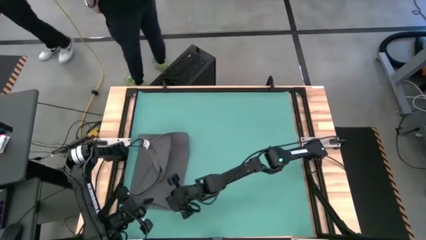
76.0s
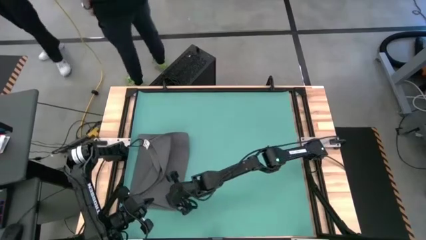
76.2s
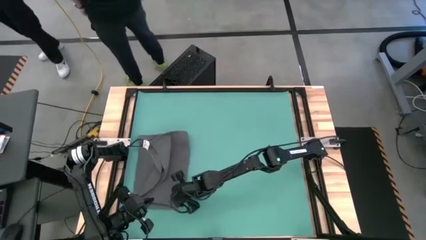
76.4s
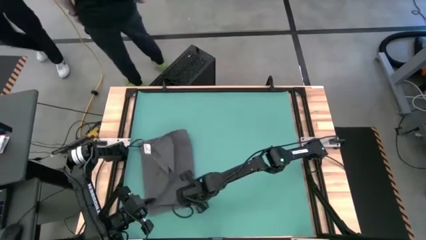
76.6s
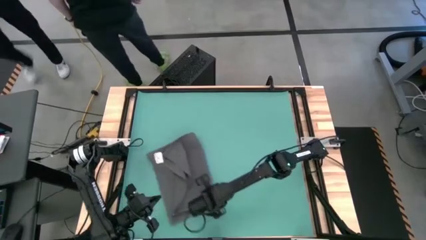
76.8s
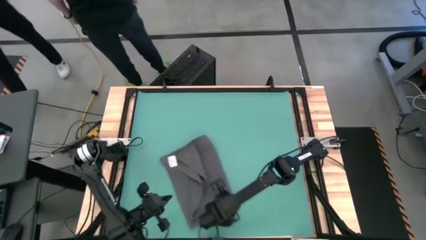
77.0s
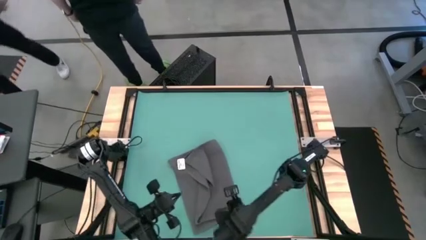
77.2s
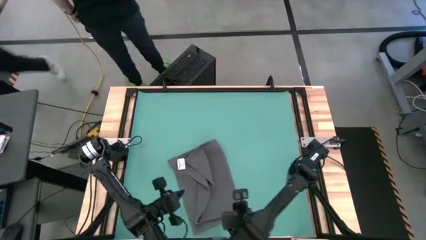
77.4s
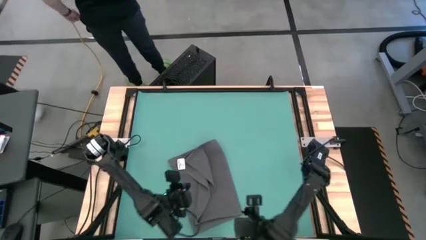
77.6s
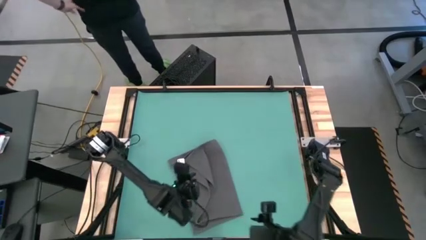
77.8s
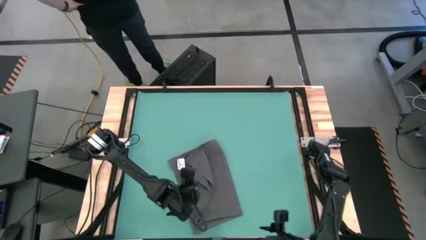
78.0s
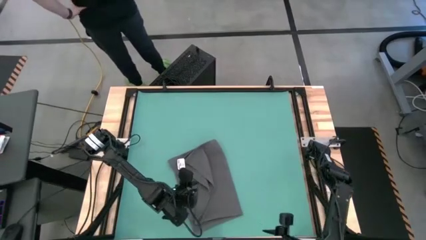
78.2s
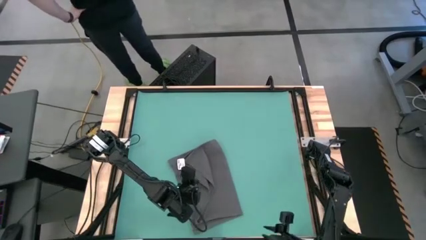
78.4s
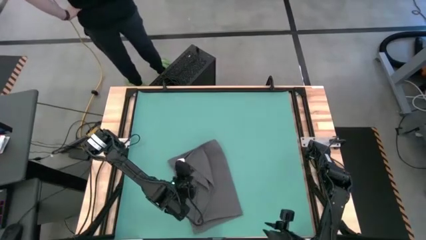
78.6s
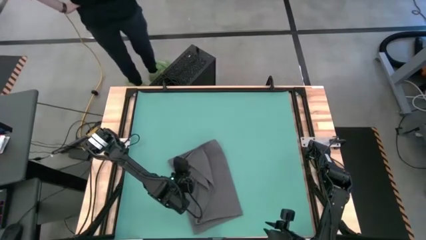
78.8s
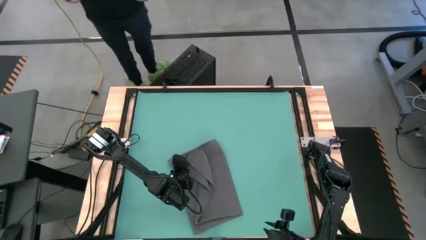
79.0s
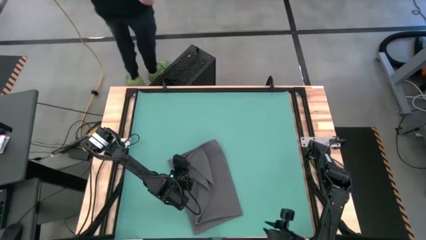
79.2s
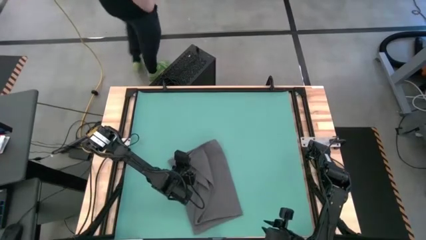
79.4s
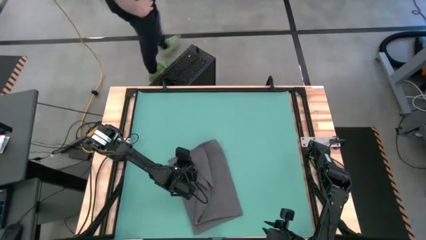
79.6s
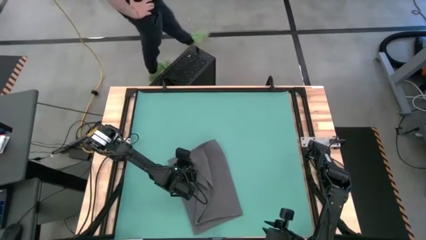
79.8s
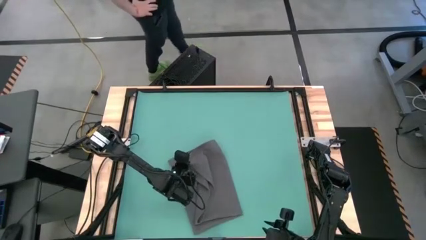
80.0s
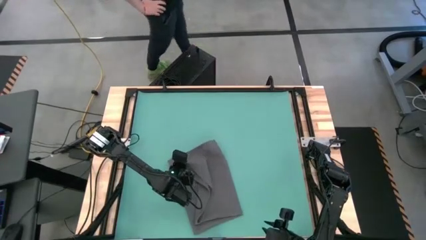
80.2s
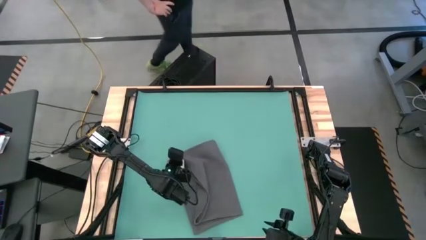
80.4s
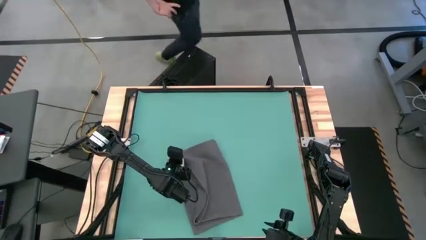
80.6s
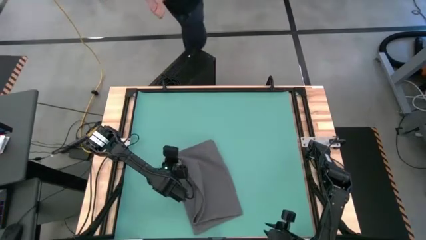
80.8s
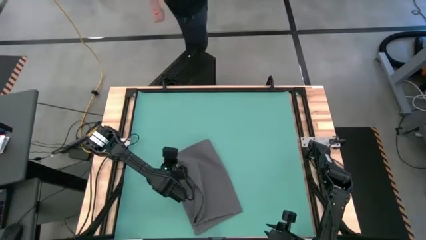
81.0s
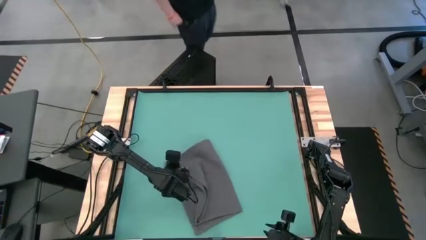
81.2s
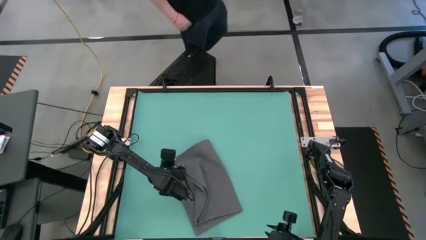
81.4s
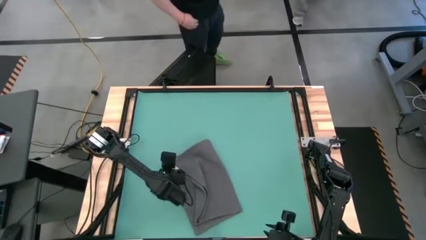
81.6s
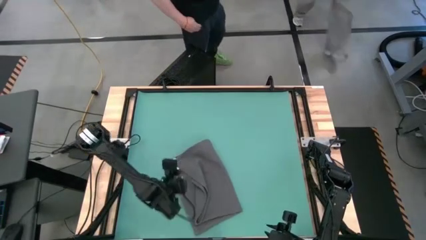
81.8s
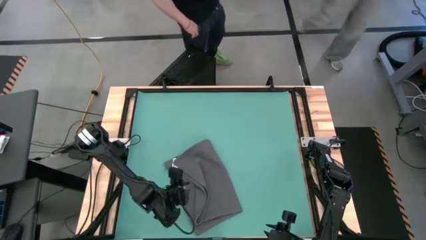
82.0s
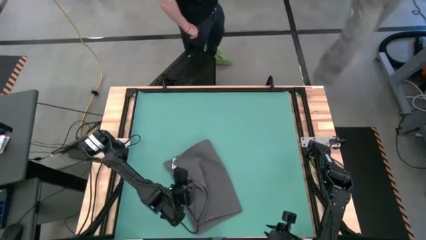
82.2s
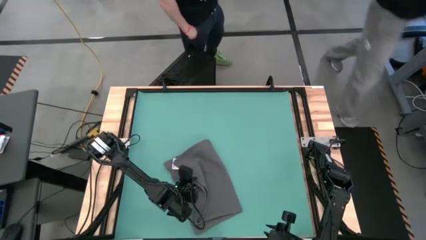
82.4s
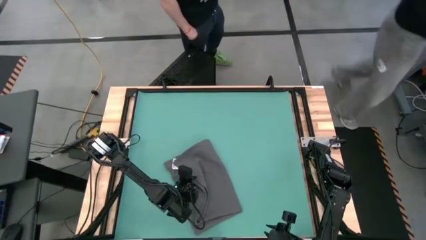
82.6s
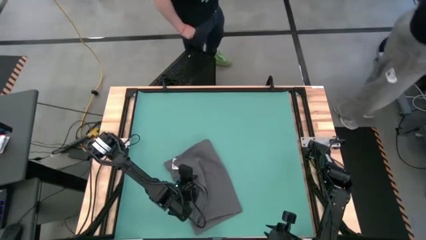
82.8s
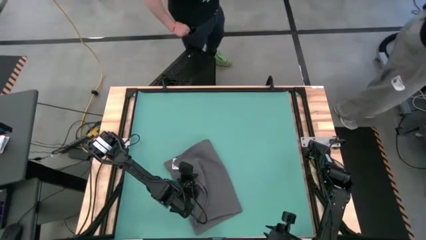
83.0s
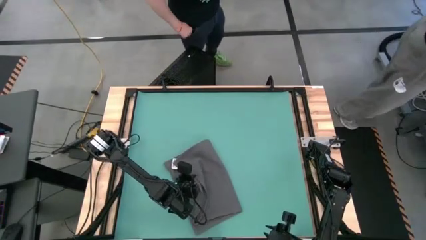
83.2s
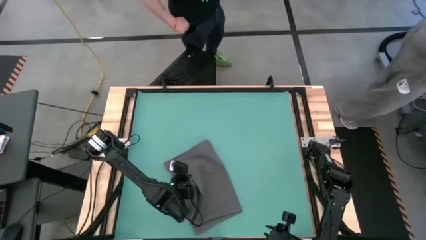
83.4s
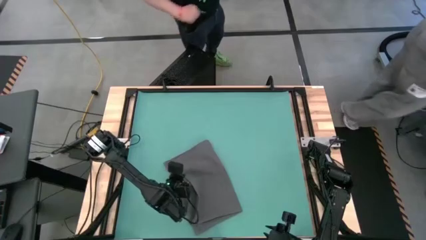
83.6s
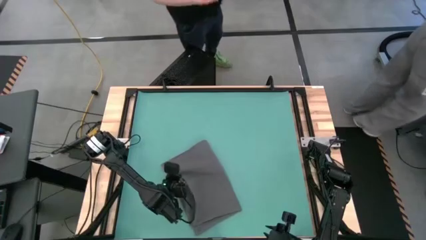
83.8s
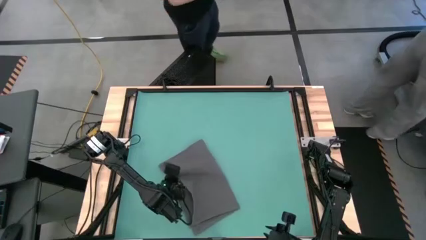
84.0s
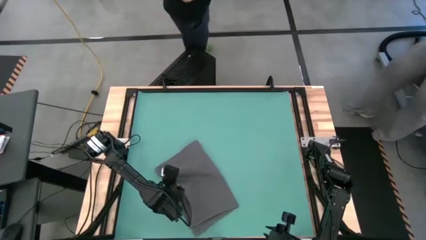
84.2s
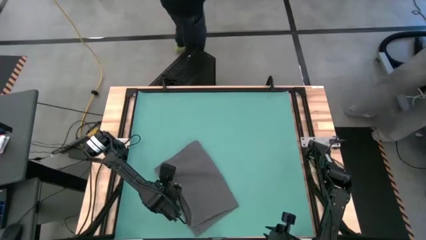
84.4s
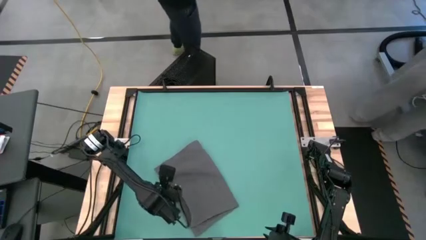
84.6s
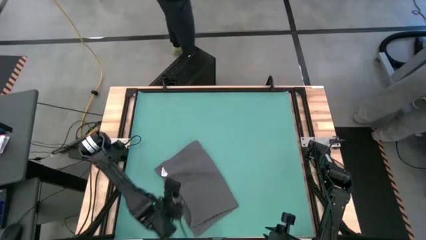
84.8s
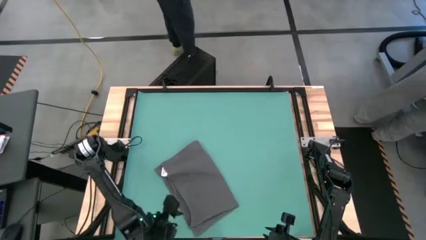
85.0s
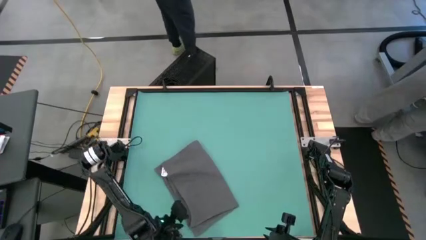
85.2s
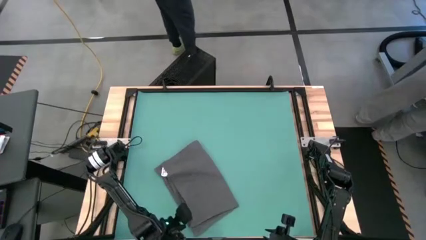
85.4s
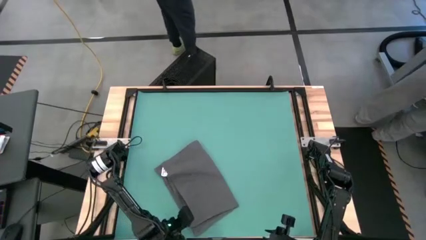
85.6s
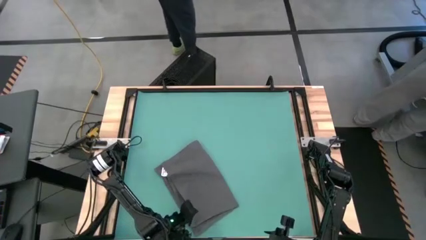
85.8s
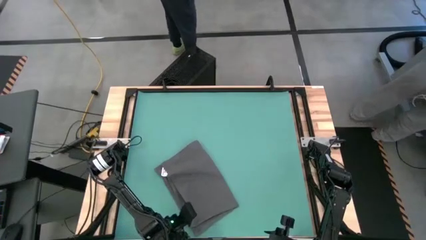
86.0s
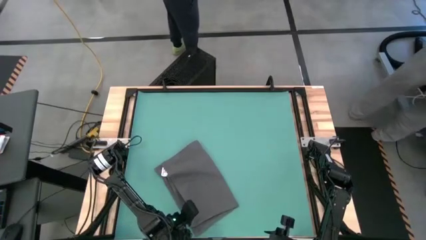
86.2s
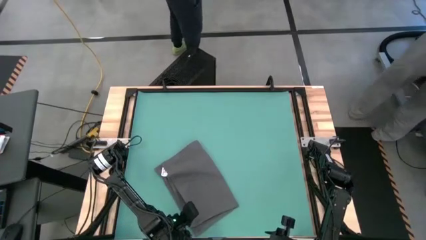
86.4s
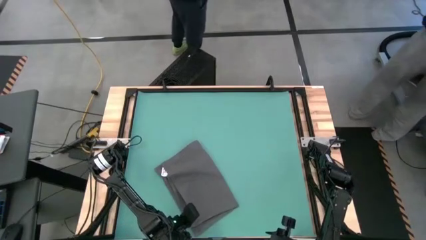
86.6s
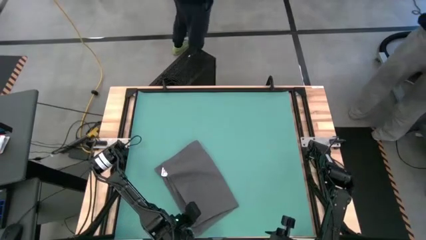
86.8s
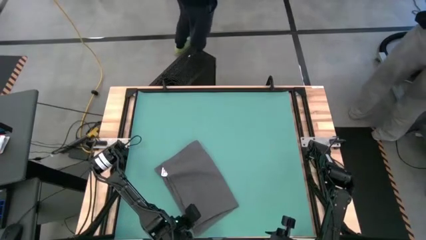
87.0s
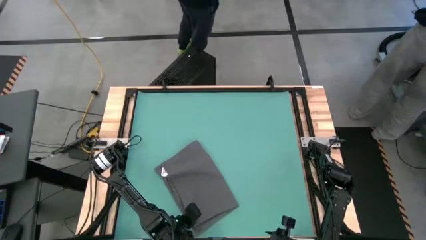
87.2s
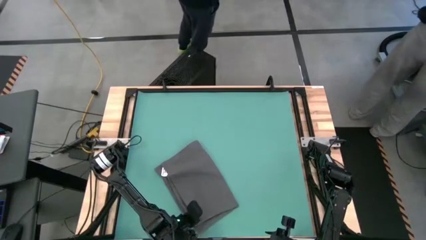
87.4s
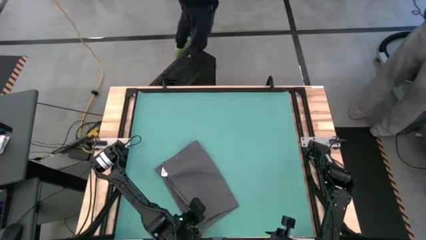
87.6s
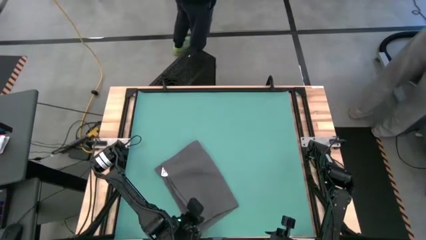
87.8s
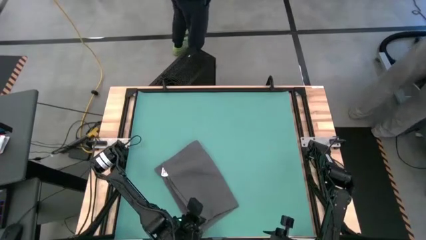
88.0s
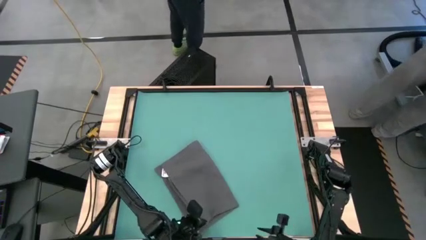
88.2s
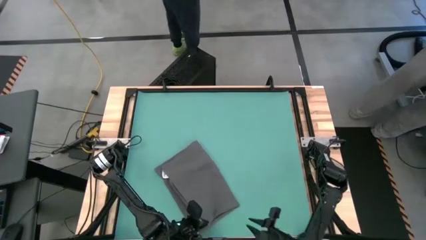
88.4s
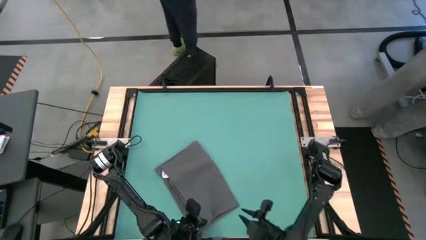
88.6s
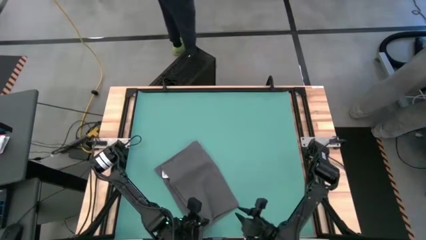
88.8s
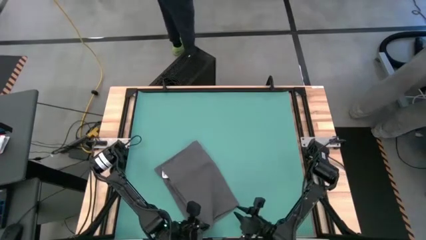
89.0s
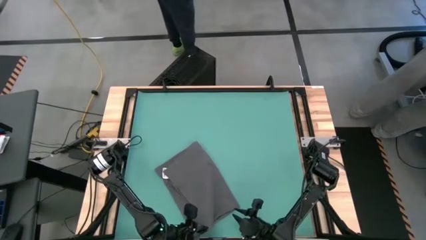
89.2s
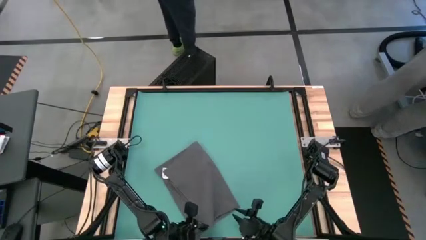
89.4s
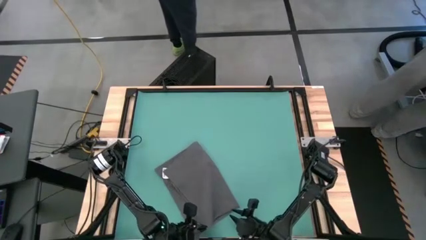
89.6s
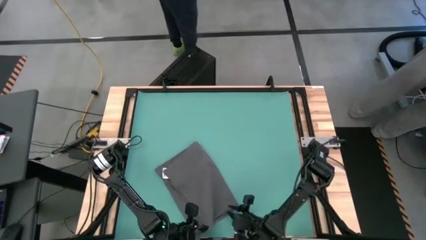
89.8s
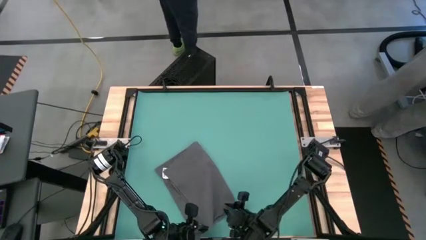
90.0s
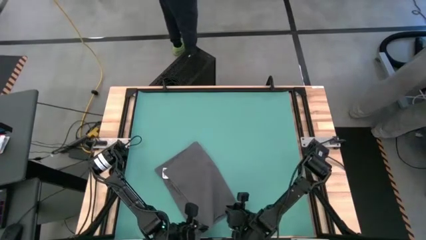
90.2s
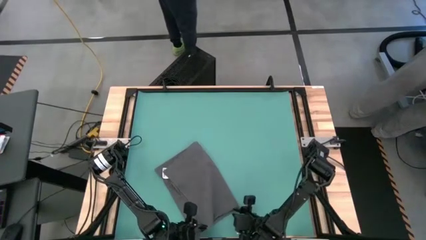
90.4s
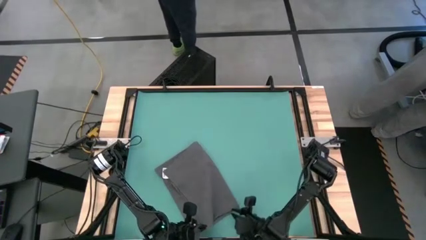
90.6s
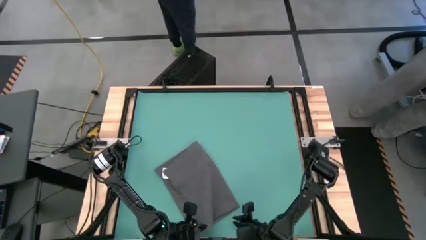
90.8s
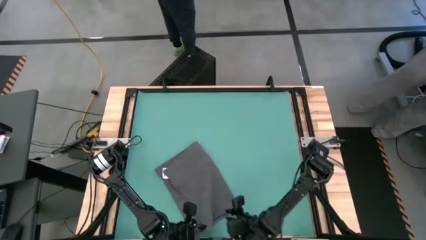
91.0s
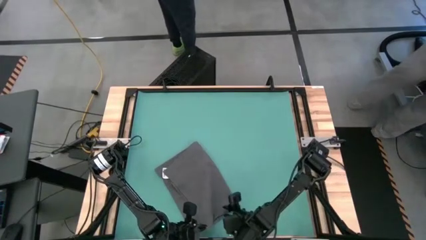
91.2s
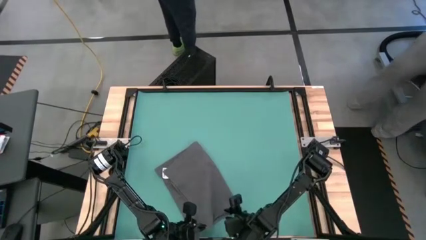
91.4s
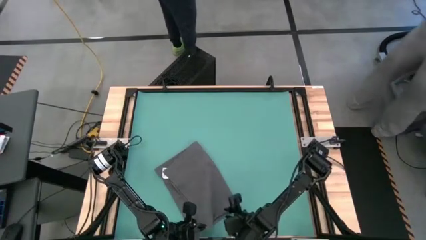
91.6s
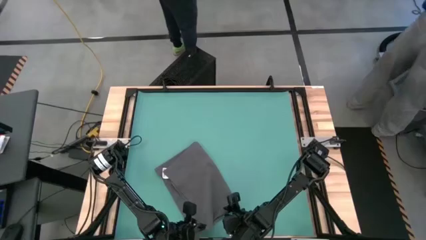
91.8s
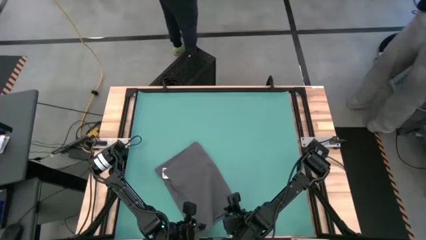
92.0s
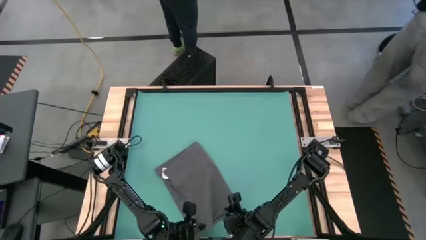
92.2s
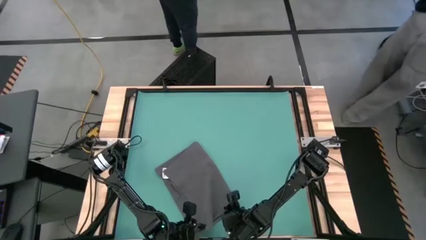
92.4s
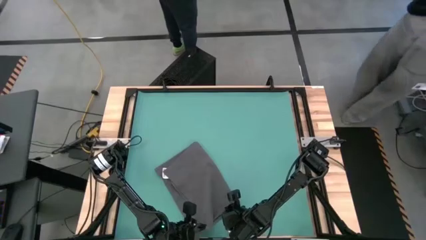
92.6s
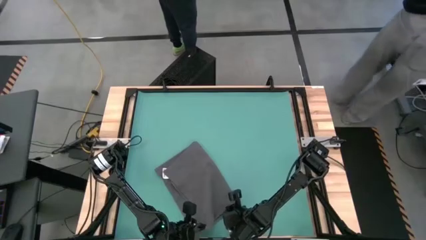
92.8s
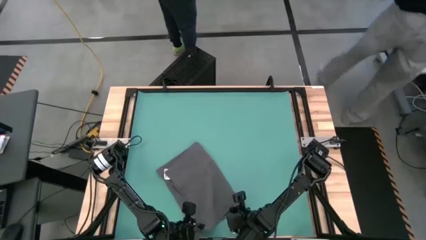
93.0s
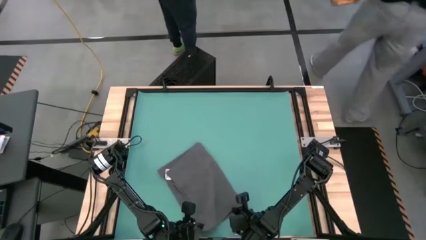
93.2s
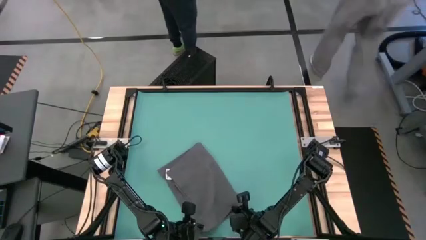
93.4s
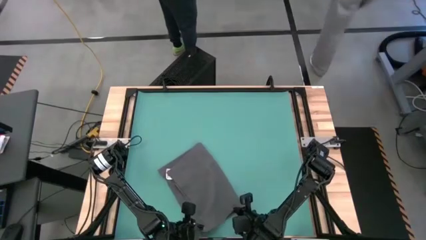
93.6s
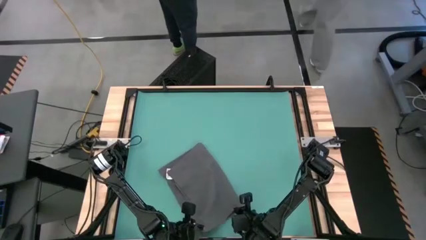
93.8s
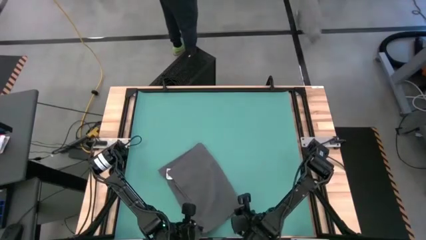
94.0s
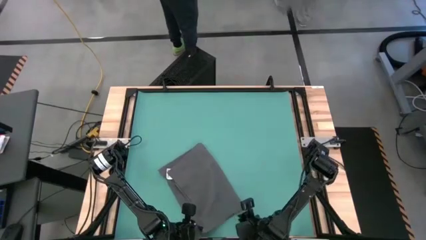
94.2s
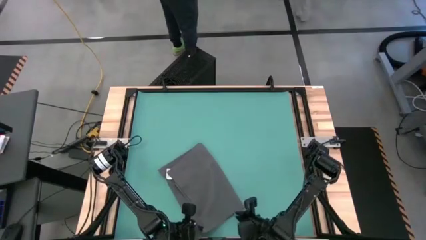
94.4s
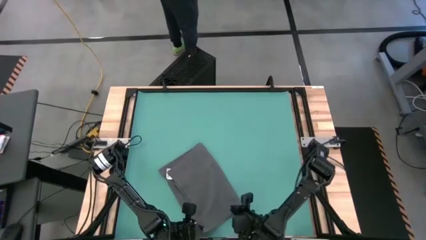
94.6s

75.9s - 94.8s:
Task: Roll towel
Roll the gray towel
